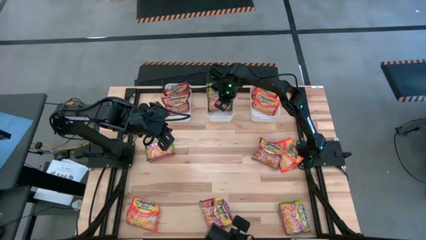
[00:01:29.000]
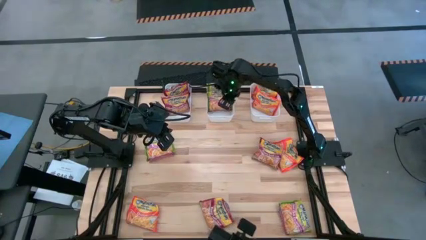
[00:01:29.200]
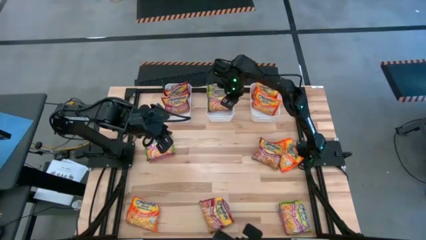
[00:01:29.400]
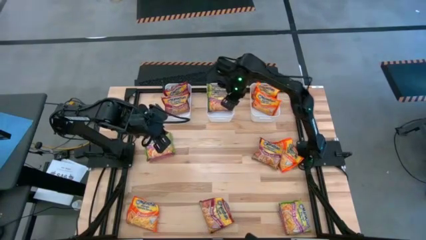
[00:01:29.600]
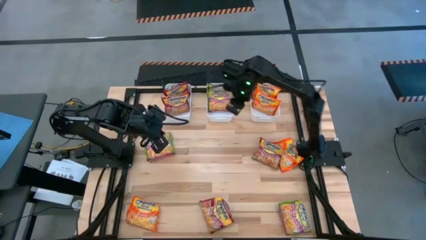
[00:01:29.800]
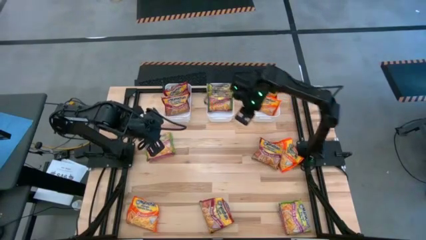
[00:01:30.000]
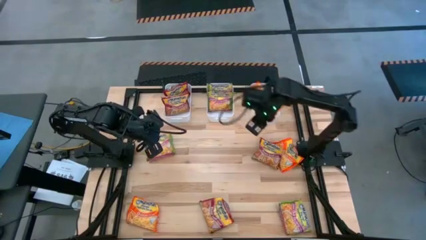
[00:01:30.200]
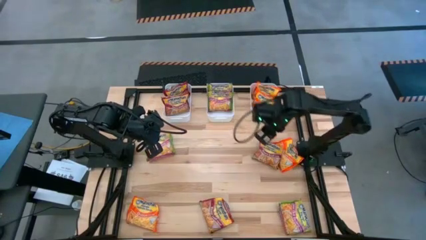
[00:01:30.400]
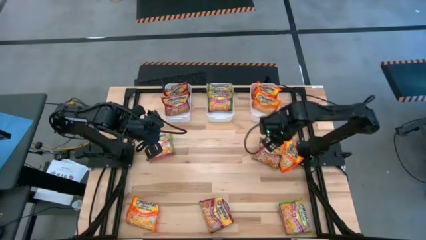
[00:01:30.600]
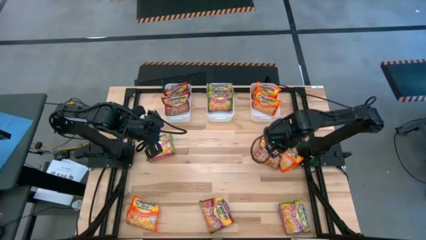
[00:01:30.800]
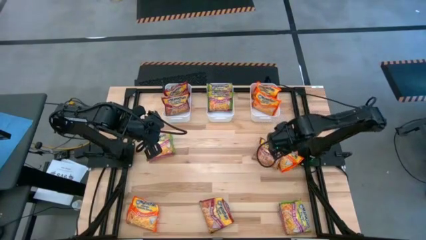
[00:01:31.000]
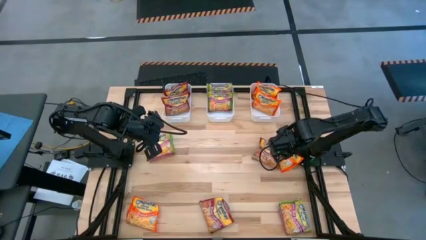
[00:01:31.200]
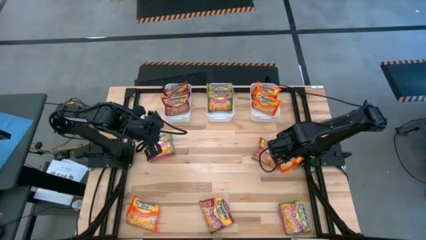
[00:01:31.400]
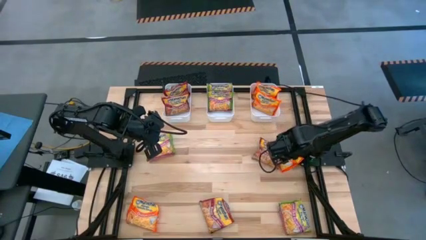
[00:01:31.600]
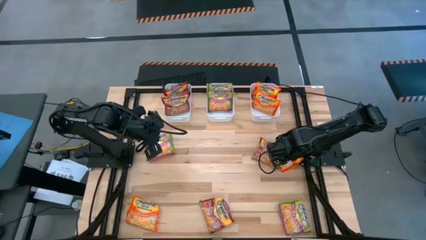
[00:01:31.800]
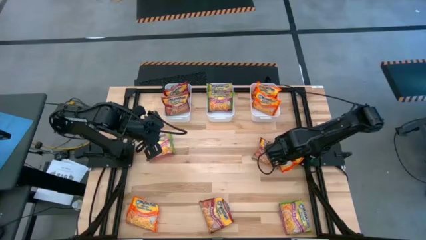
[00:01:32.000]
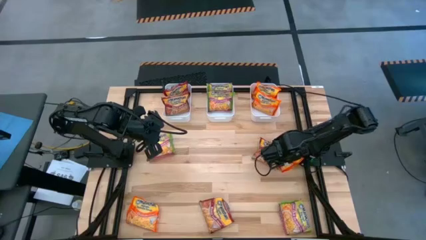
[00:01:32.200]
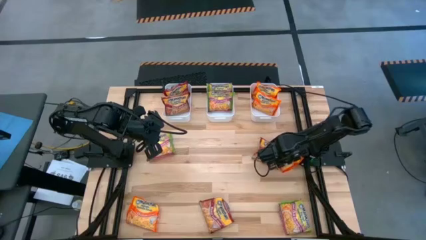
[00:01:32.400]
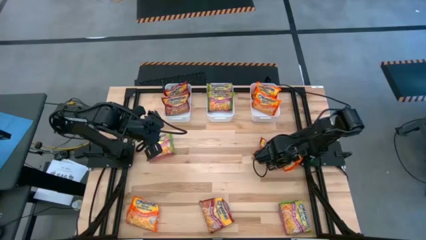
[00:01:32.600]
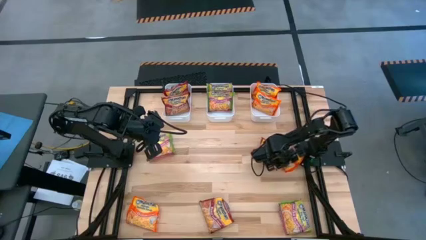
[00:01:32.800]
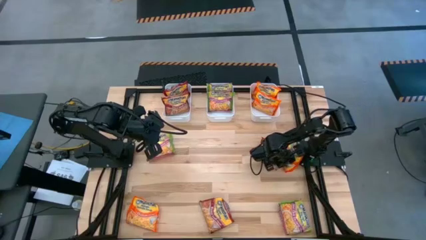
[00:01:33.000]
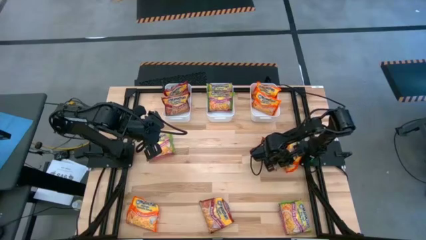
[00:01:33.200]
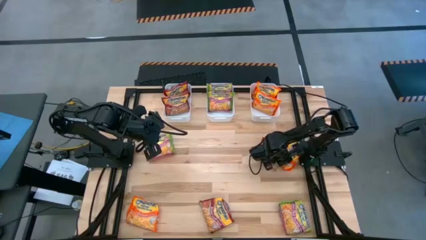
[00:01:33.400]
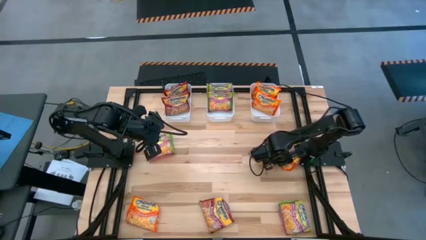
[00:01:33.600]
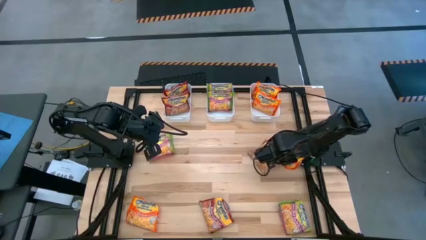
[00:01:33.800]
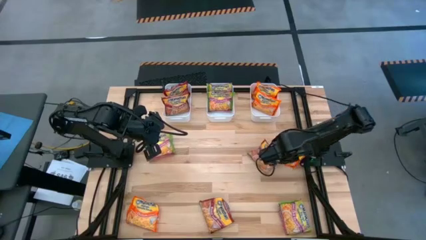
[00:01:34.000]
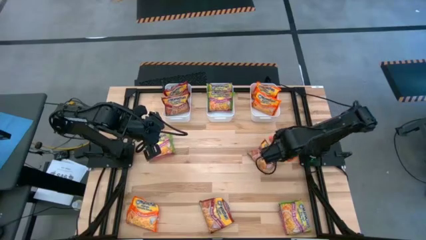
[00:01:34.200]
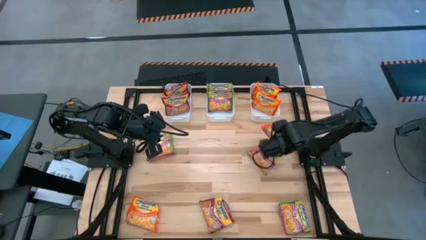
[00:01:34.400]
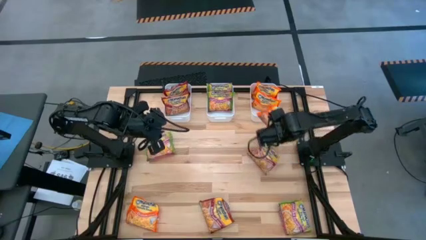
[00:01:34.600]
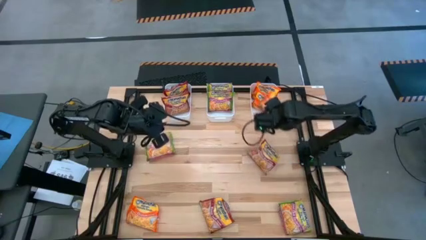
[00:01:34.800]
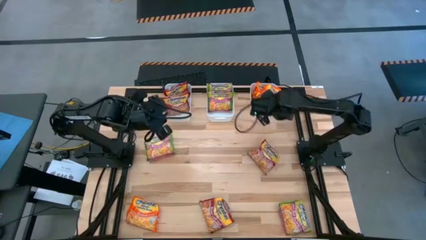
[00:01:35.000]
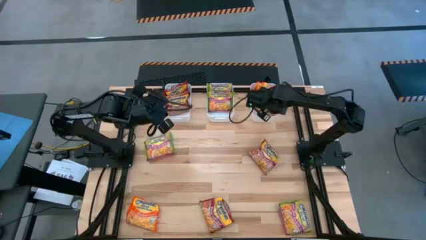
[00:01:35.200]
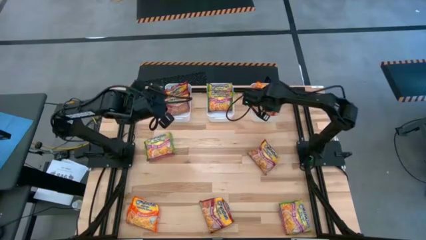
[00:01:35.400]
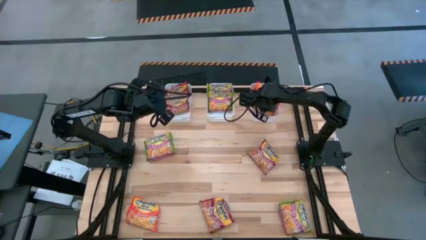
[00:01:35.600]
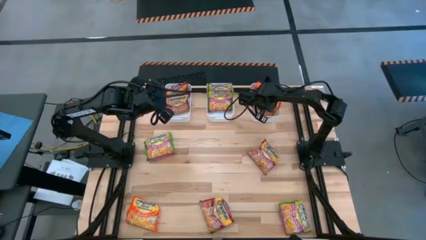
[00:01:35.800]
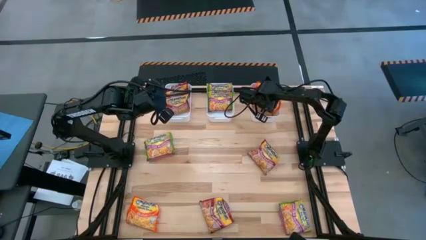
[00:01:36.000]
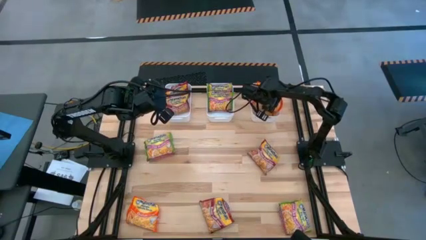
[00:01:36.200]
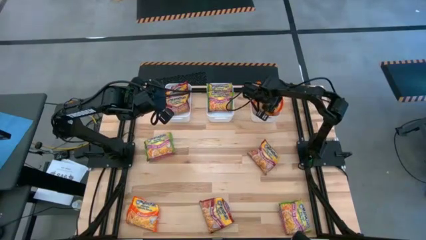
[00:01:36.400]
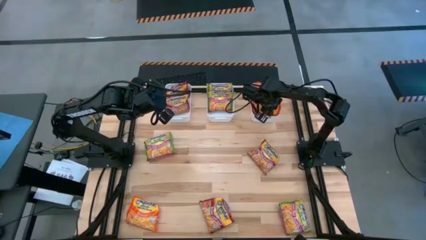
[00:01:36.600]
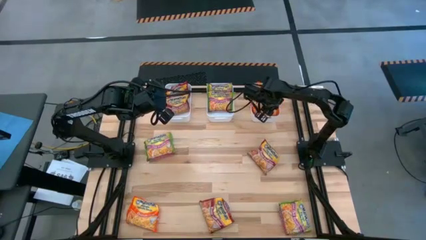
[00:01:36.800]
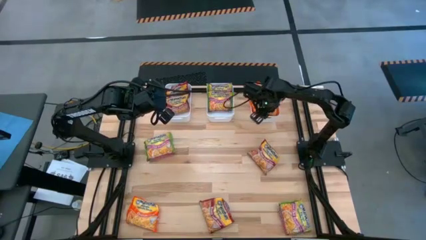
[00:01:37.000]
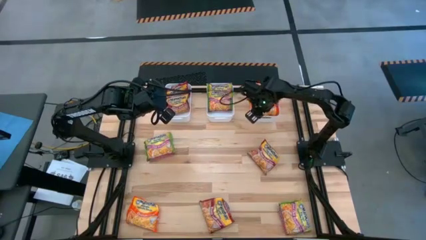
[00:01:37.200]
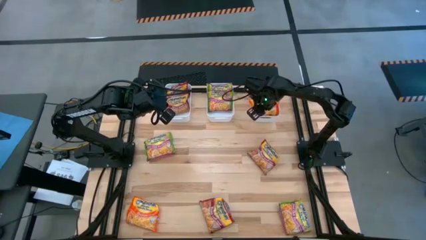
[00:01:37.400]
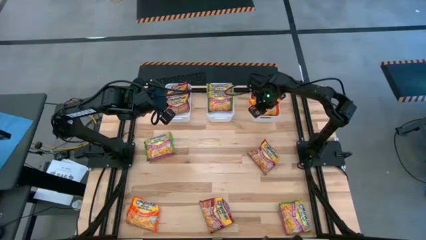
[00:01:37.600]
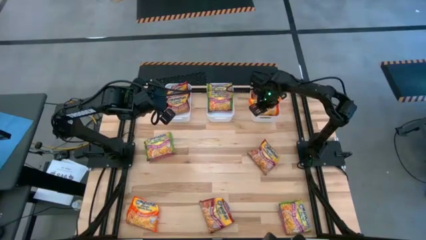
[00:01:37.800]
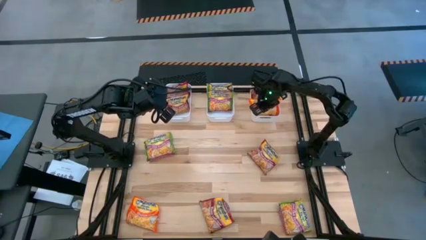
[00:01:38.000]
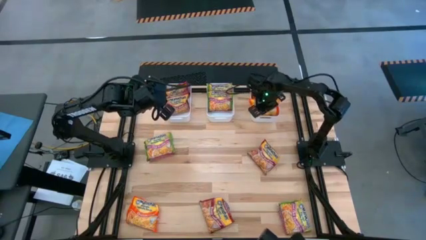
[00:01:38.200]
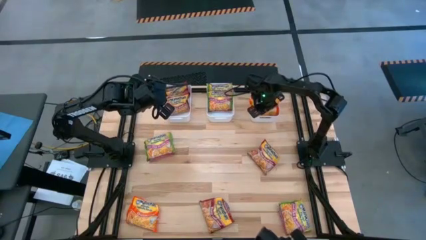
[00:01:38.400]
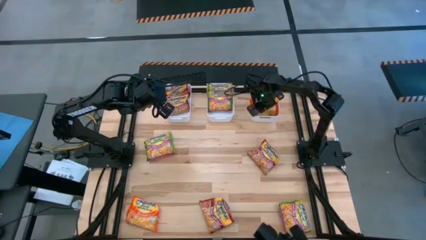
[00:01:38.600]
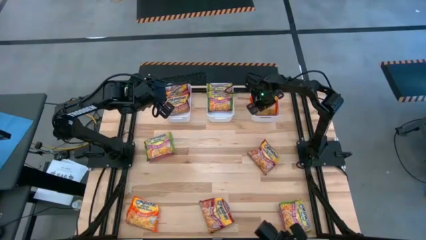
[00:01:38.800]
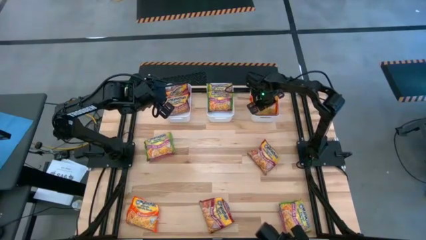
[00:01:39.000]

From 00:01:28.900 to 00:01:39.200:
Task: Sort Maruchan noodles
Put the orange noodle pack into the right white bin

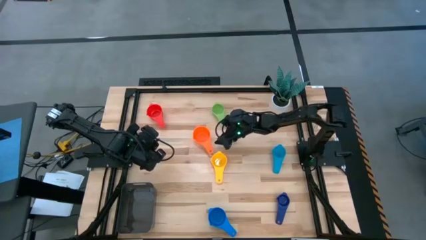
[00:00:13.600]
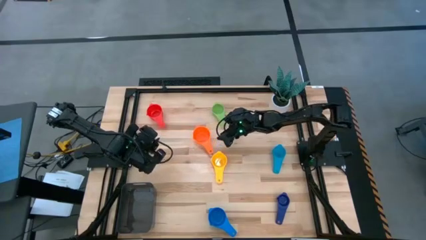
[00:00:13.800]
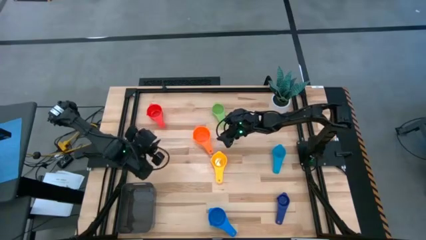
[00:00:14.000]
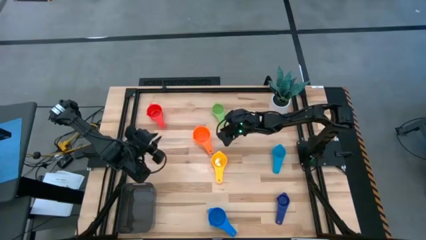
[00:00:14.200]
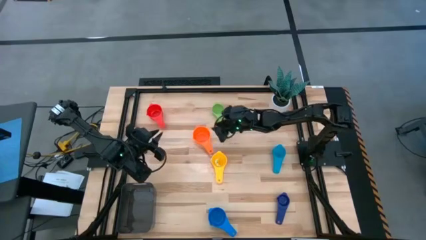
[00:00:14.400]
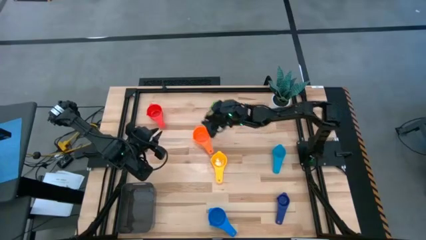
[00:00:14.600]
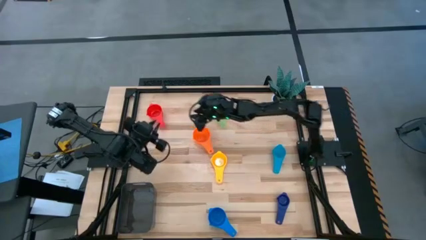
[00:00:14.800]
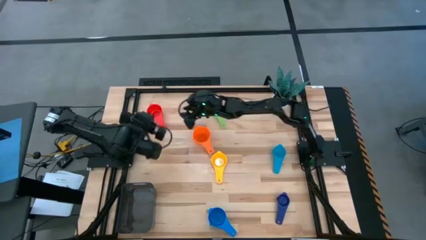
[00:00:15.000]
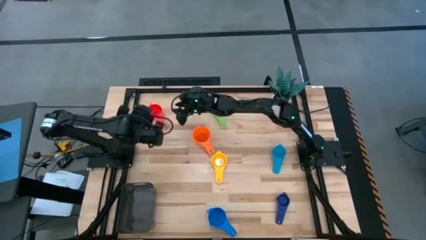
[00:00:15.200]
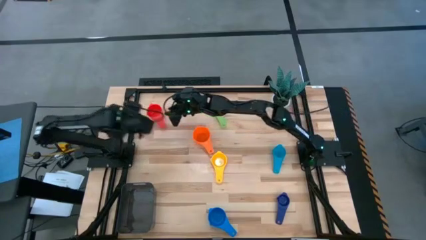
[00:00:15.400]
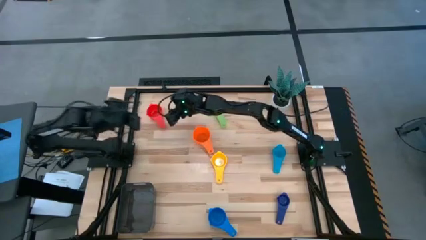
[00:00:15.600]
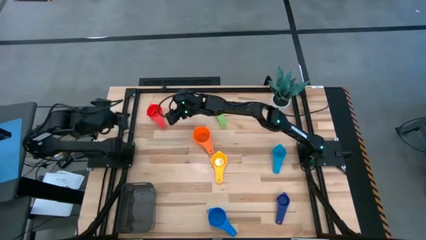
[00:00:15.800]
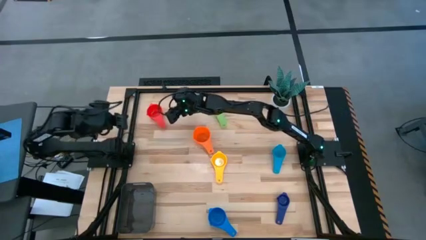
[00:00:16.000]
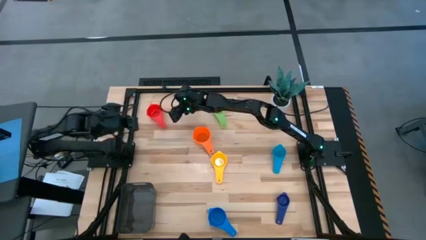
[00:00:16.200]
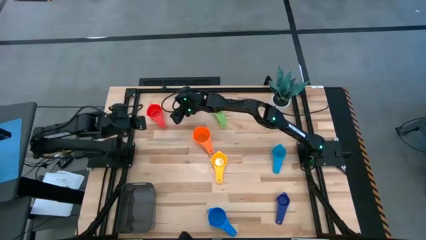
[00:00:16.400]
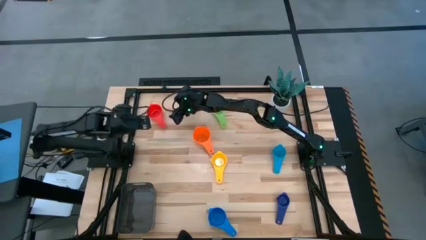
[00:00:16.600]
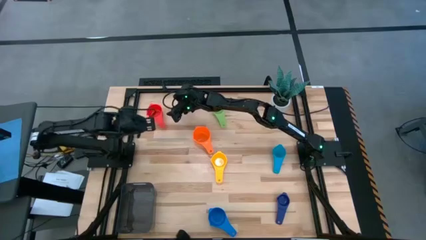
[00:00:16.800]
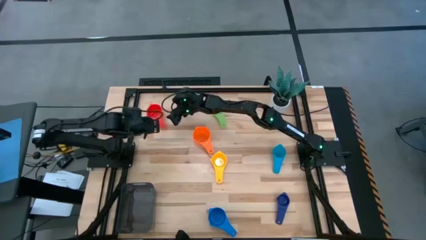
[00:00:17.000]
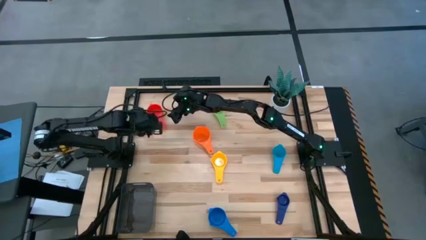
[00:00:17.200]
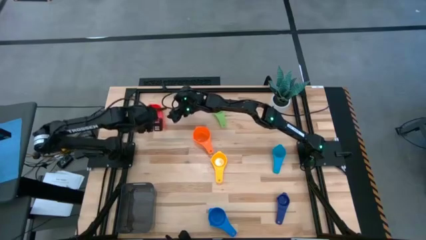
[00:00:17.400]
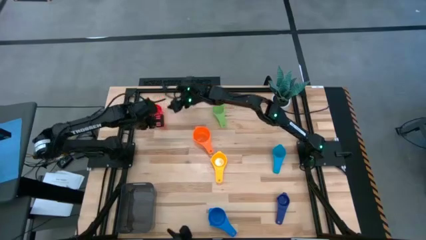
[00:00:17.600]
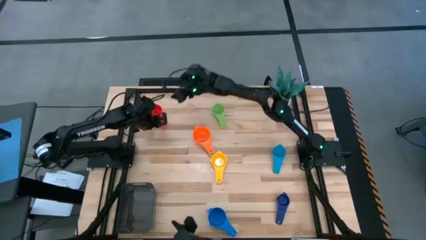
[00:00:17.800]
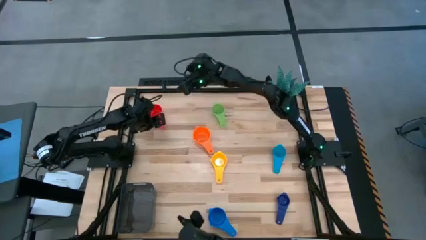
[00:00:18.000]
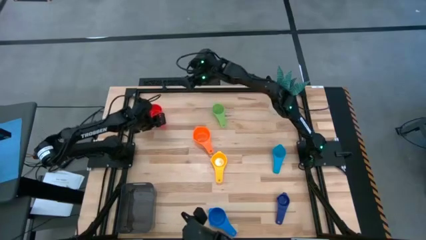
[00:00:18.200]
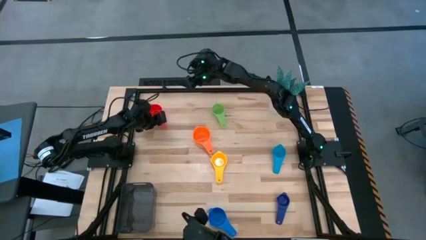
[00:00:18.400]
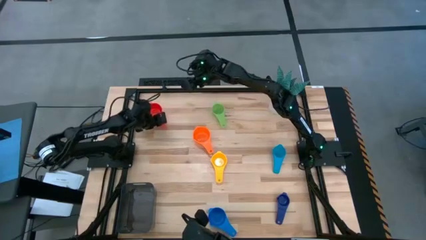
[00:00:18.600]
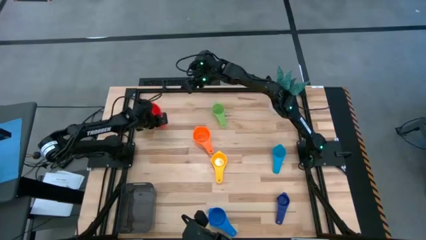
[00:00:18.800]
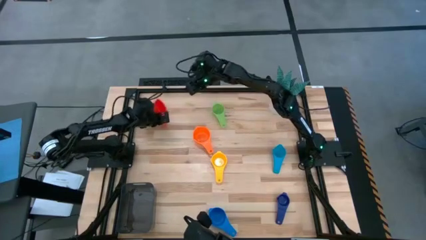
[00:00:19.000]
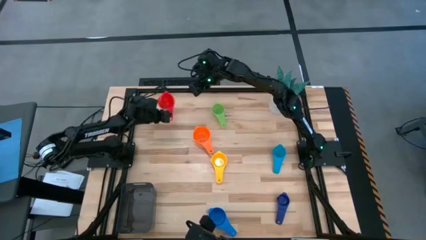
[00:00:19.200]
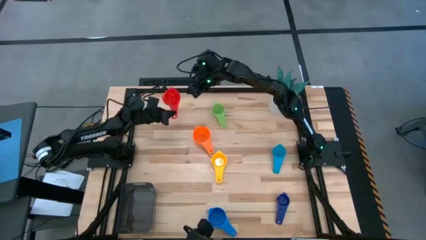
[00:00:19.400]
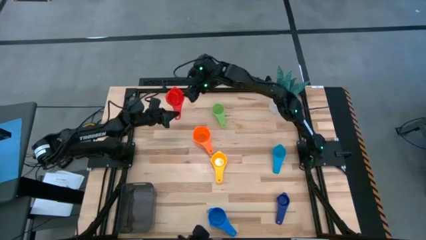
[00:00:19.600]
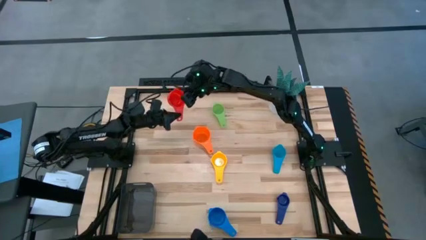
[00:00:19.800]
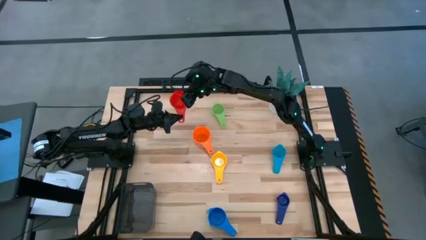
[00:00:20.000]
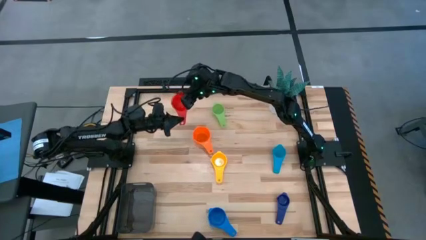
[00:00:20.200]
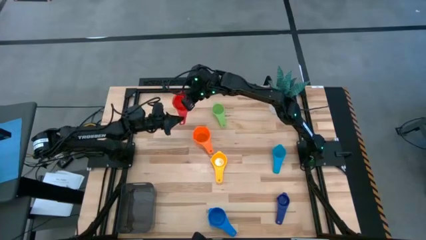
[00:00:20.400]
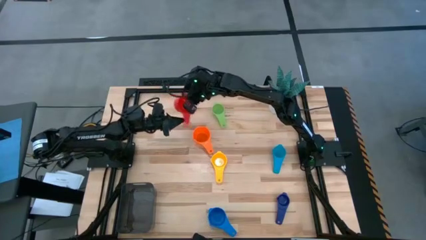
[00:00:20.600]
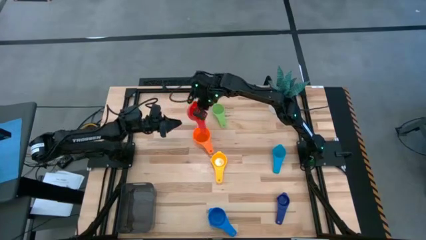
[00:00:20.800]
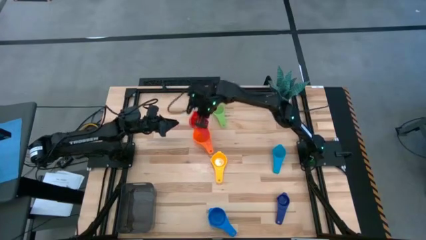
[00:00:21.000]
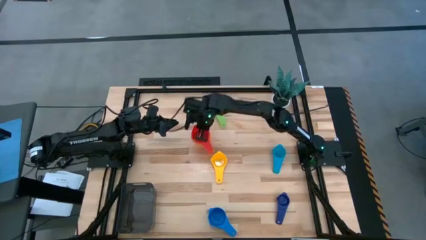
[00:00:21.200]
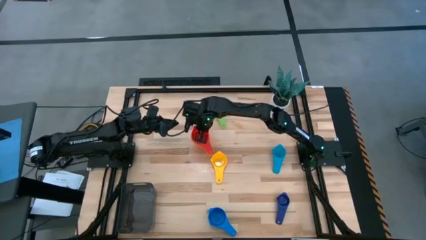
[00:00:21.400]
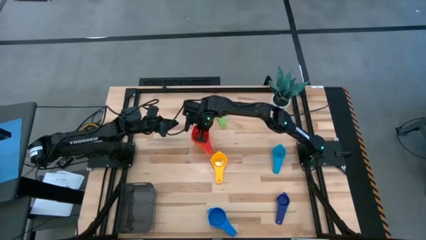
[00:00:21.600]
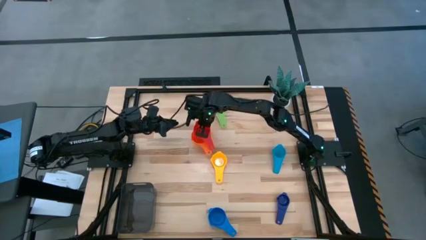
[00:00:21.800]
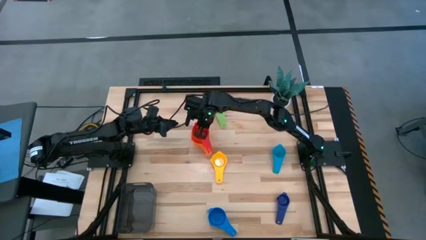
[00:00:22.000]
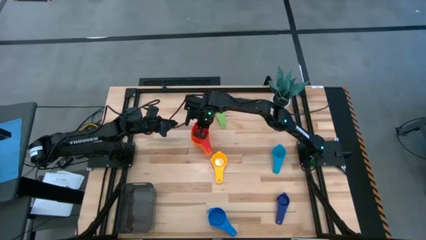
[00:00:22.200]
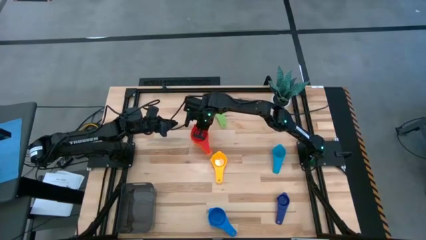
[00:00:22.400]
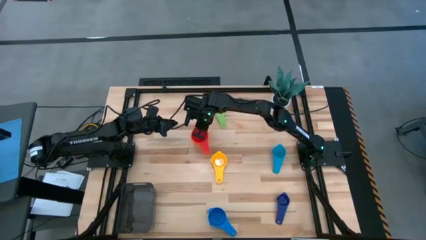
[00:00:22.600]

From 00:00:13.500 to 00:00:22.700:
Task: Nest measuring cups in basket
Stack the red measuring cup on top of the orange measuring cup
